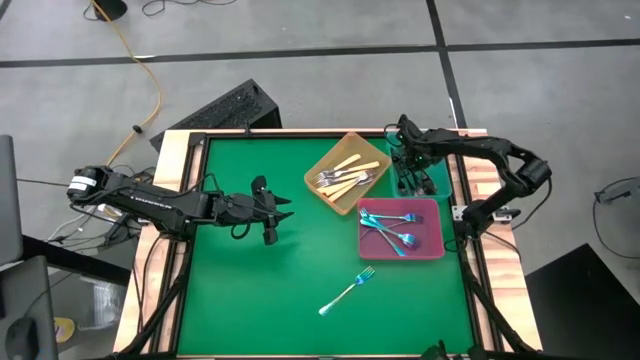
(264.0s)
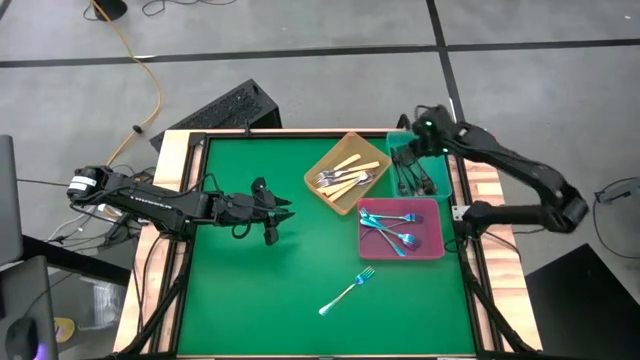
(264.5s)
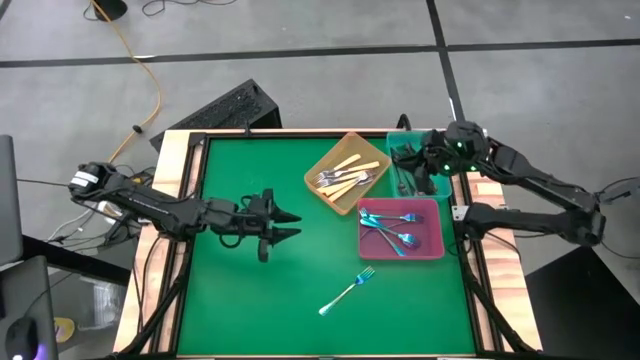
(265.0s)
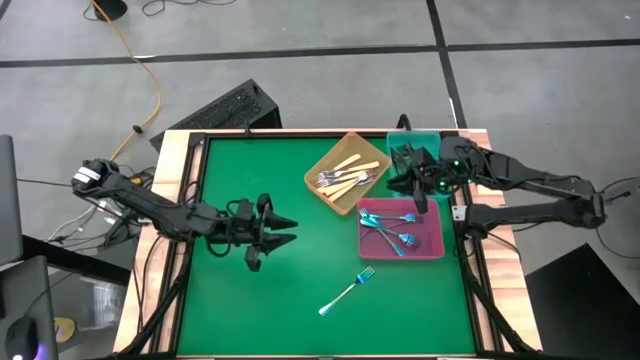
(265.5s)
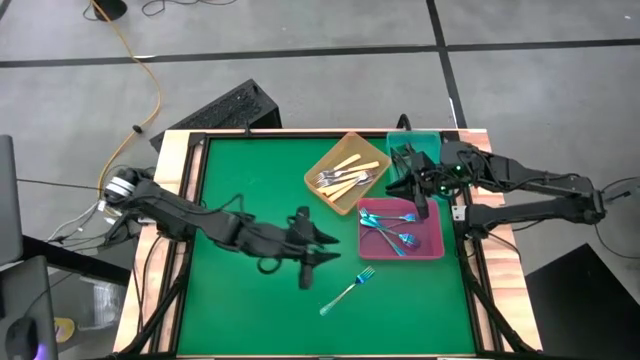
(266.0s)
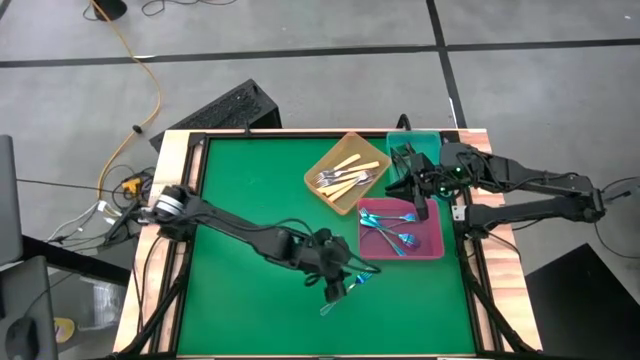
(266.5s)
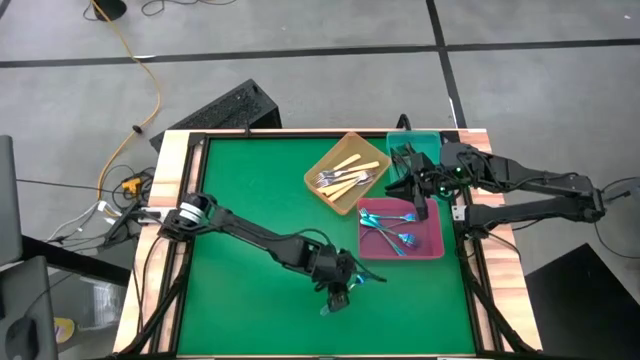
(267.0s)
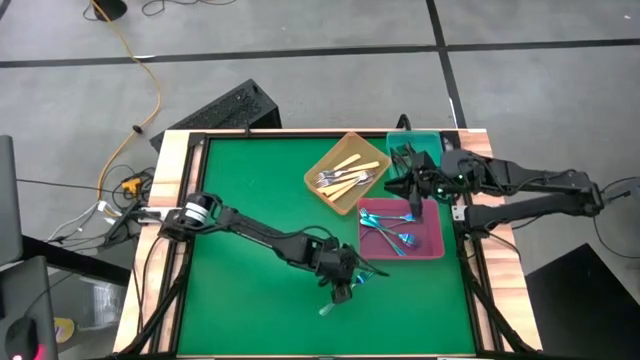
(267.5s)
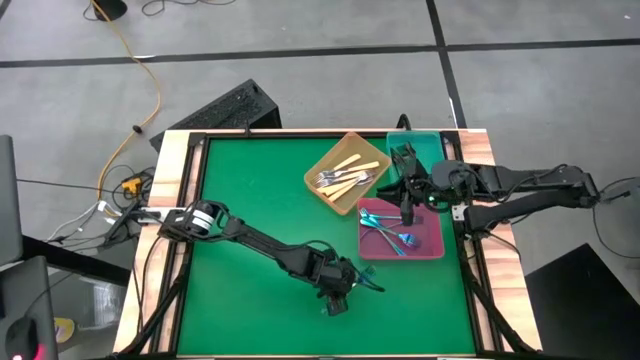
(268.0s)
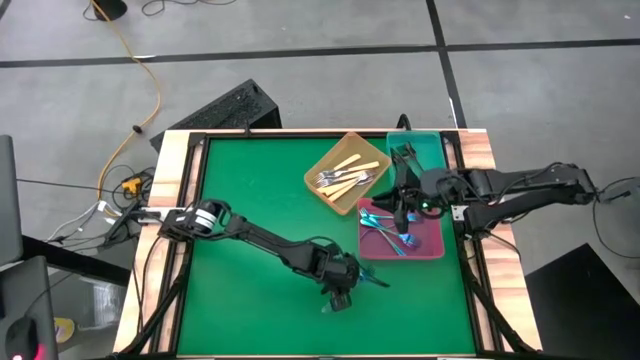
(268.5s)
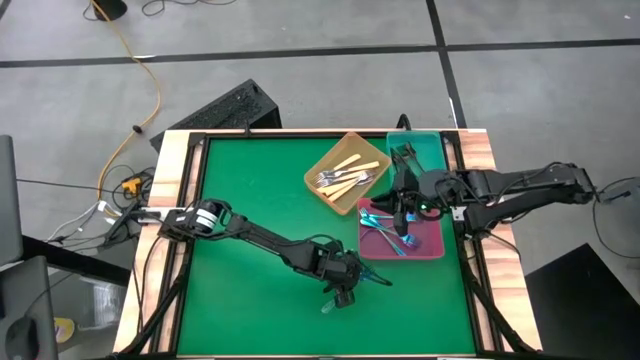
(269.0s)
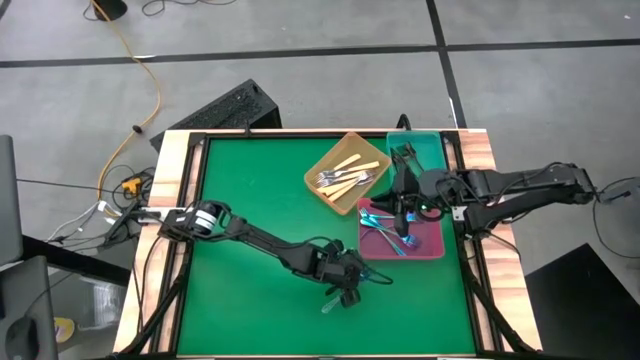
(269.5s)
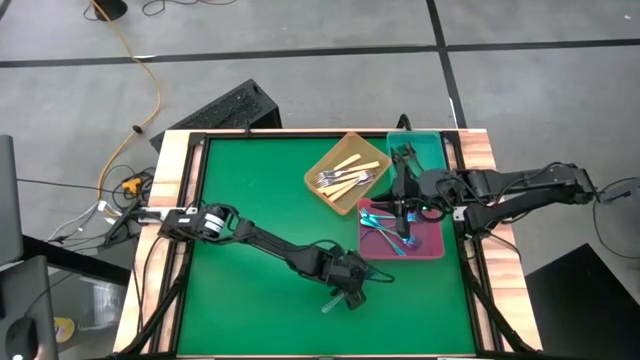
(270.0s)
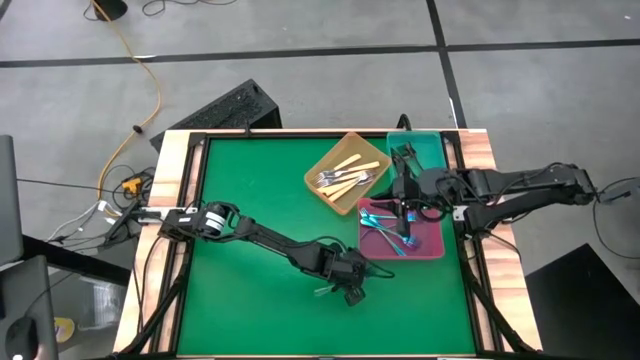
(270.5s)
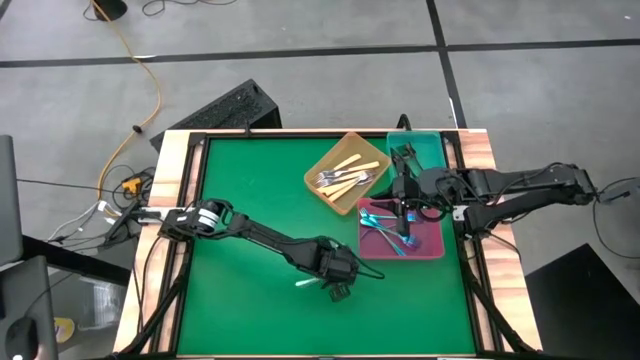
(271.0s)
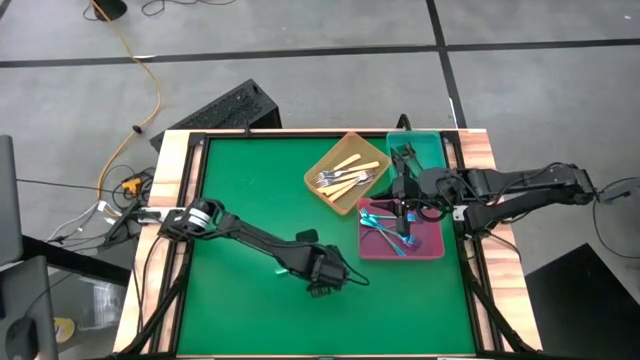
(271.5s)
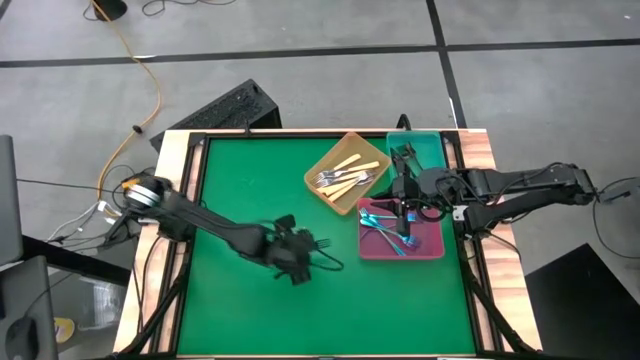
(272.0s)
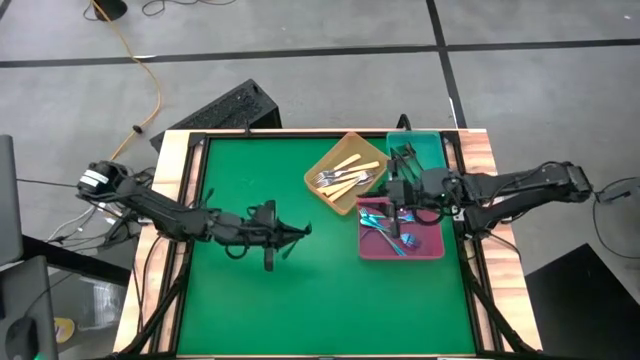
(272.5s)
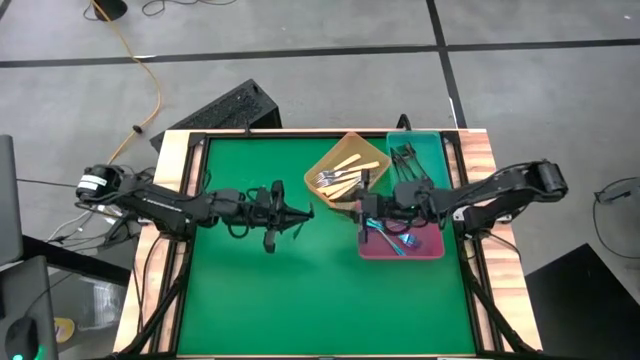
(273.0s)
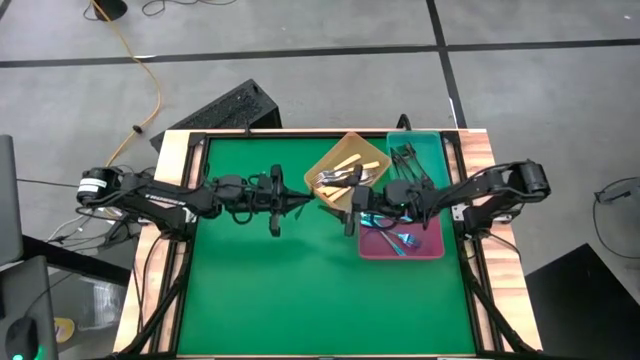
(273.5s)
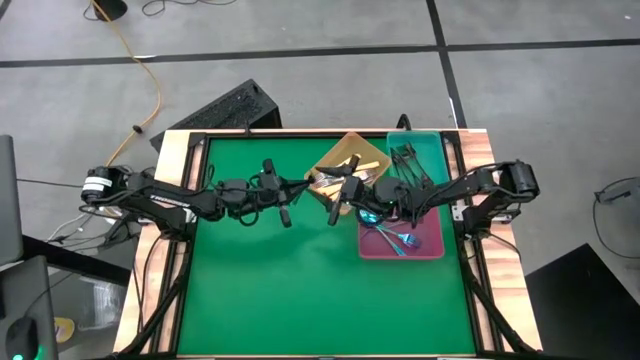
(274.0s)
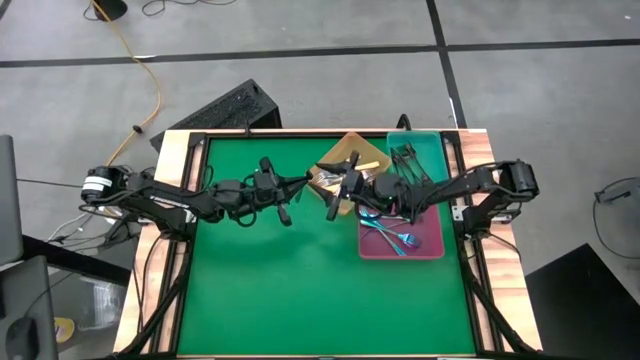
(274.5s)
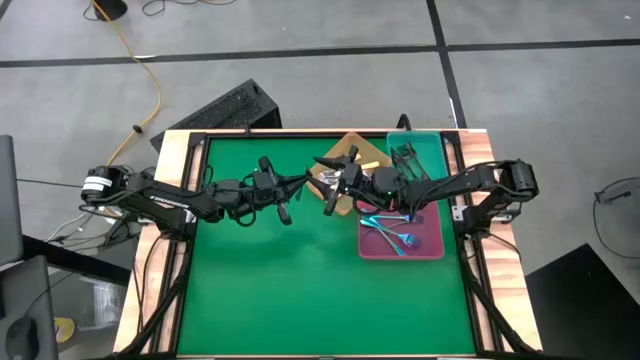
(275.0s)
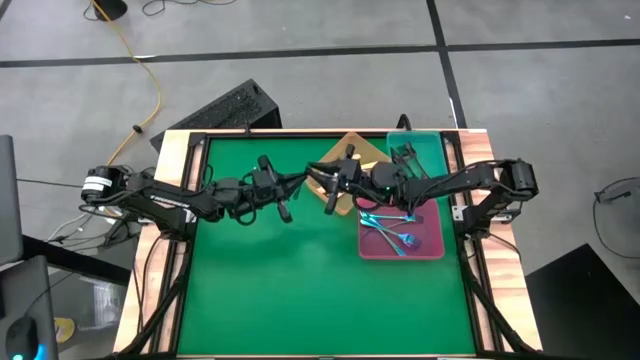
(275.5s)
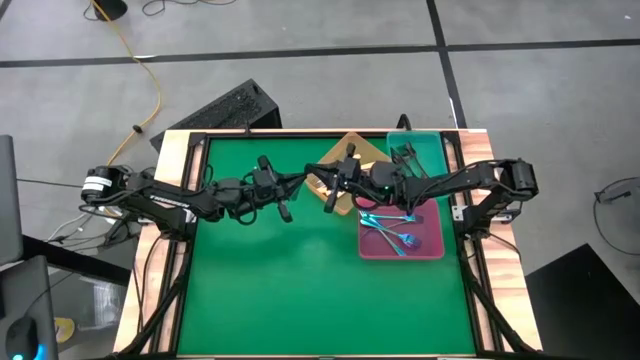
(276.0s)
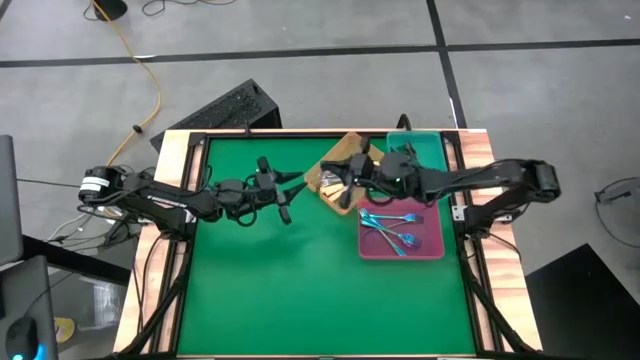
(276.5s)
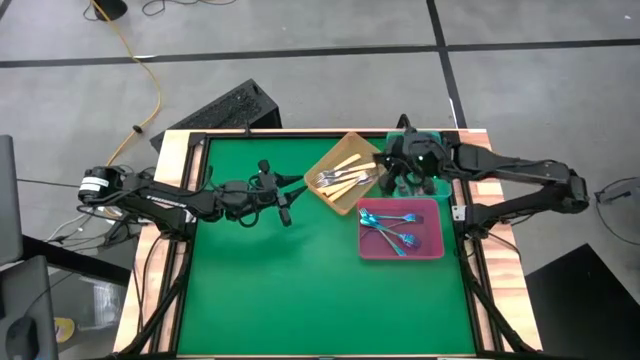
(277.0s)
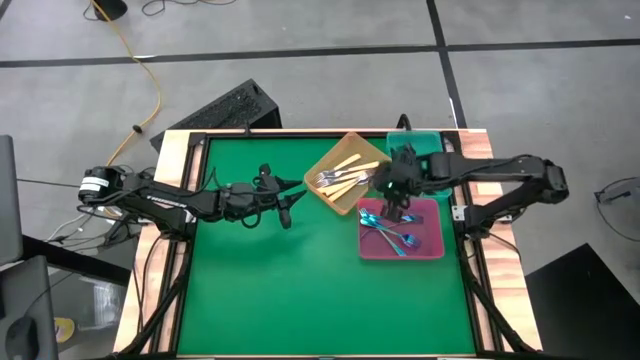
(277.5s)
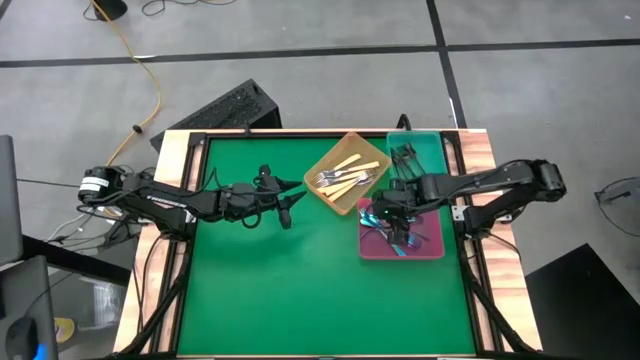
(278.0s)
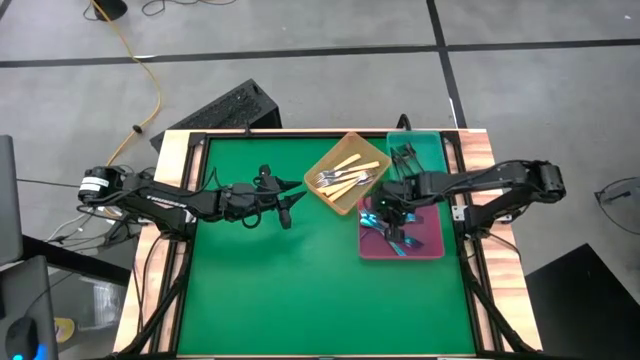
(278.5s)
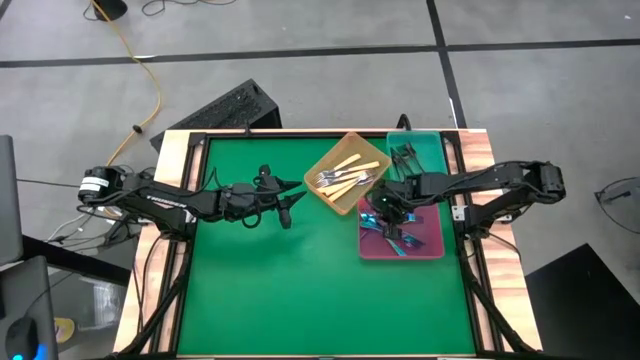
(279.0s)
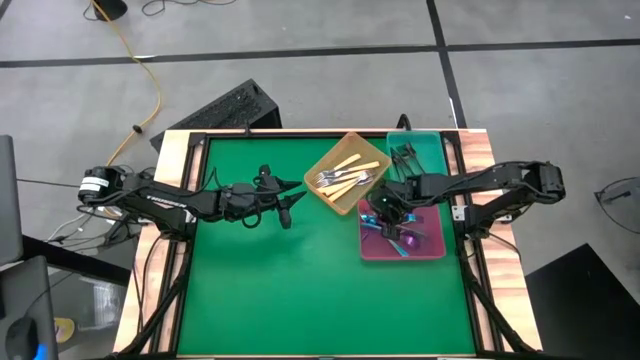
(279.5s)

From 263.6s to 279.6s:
Task: Sort silverware by color (type)
Put the blue fork into the pink bin

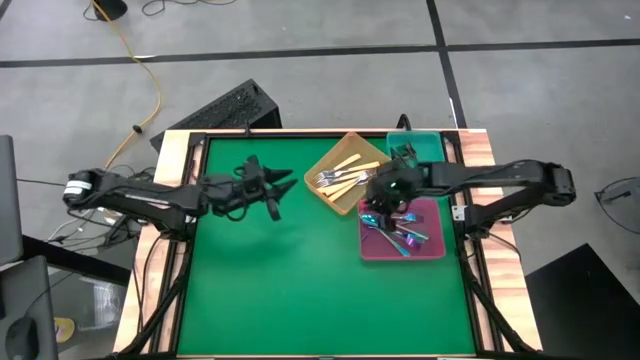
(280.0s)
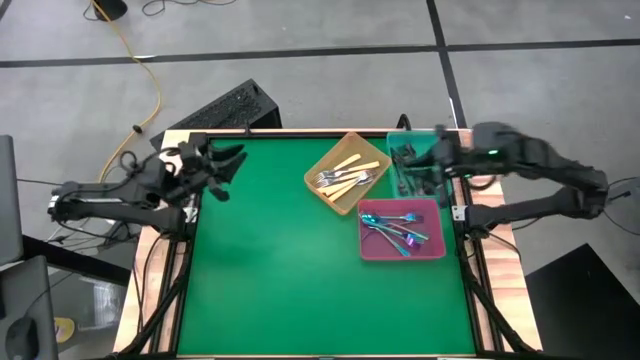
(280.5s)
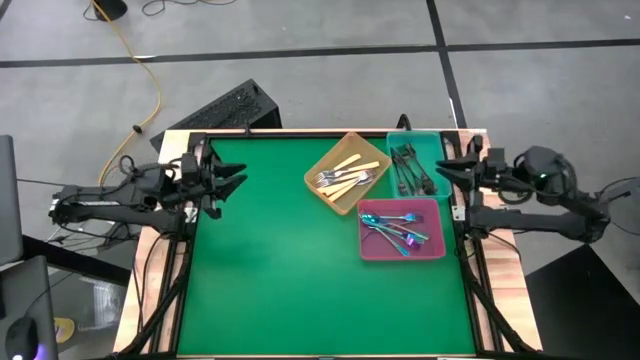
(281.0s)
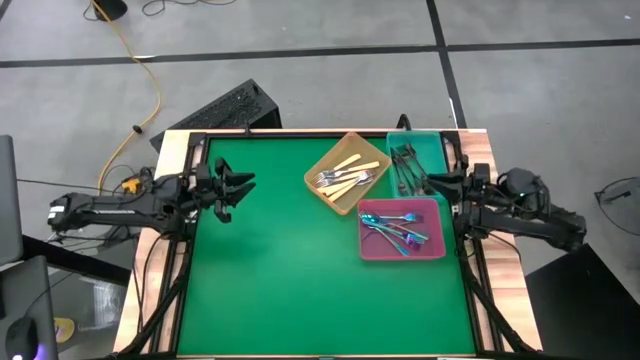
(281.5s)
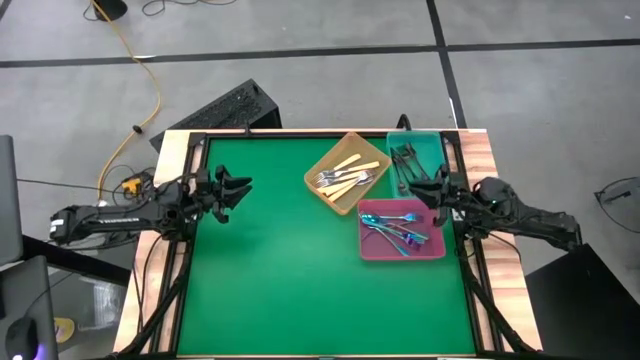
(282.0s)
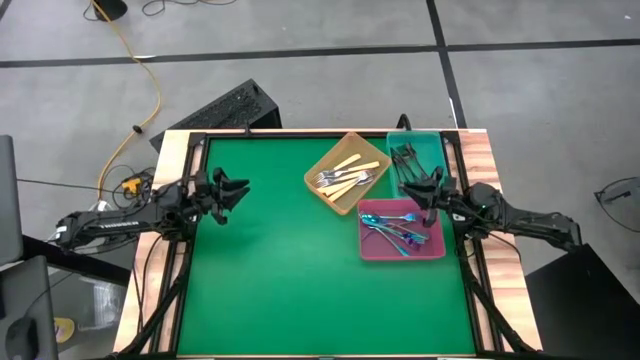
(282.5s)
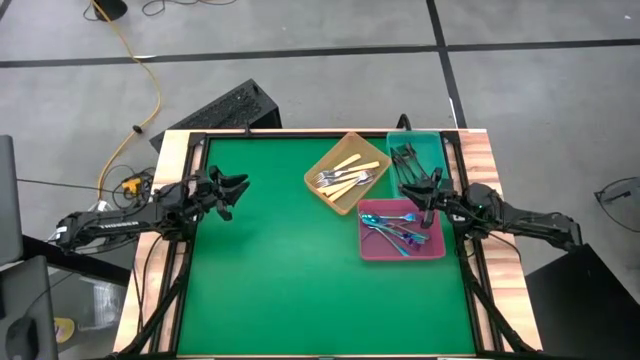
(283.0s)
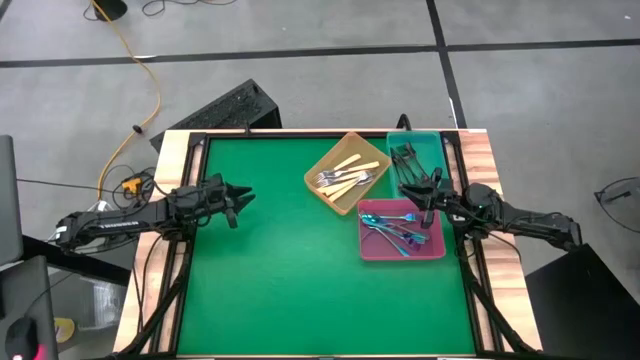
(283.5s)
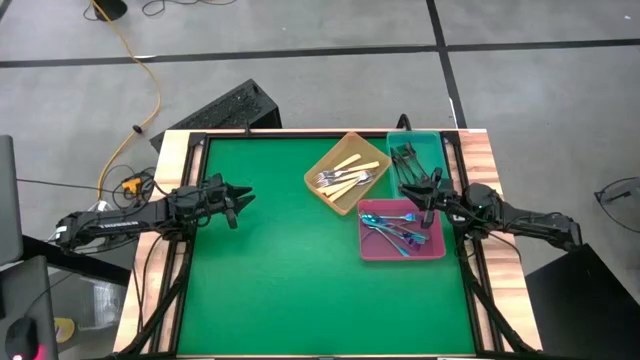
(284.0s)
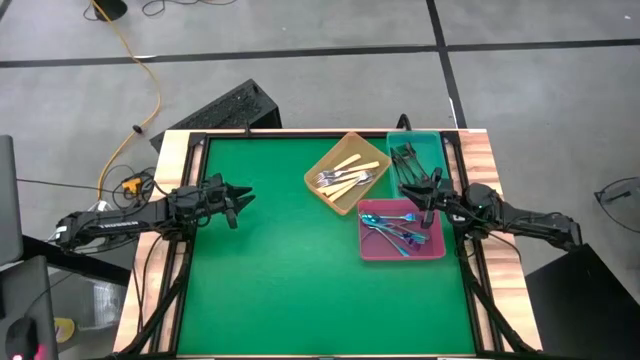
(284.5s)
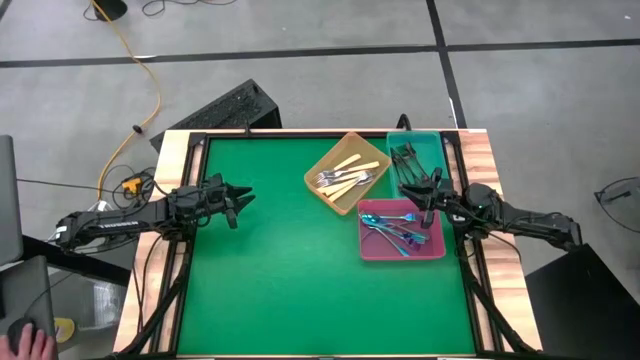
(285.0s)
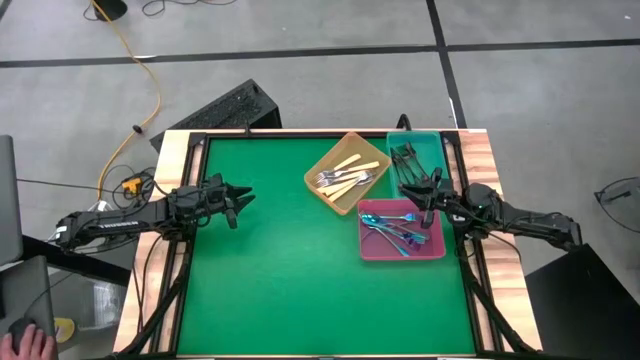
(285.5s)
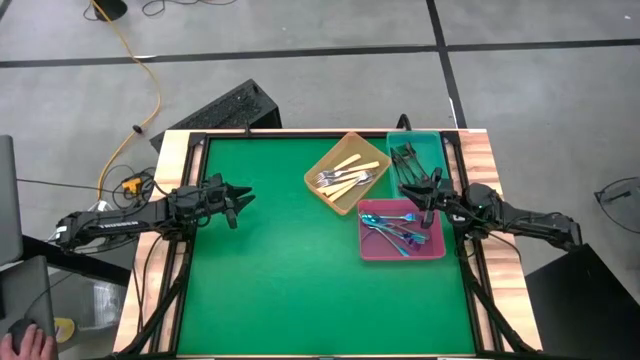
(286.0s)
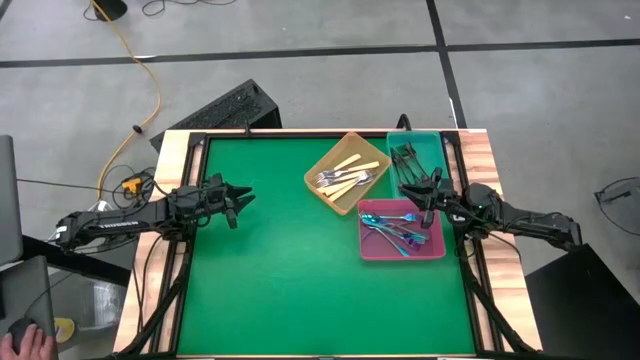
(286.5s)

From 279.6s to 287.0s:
Return to Home Position
